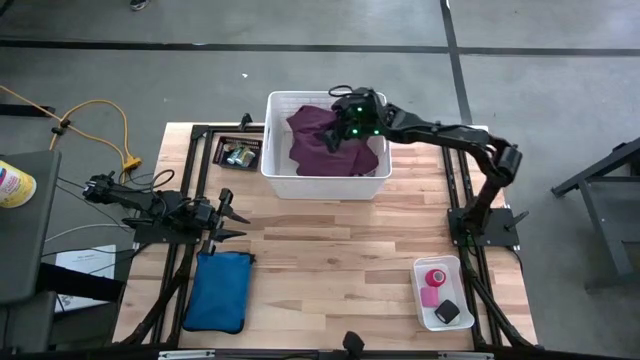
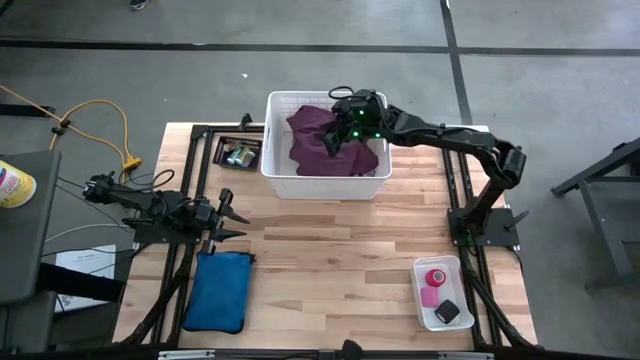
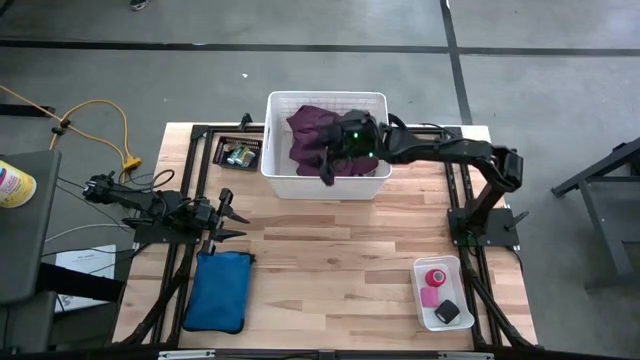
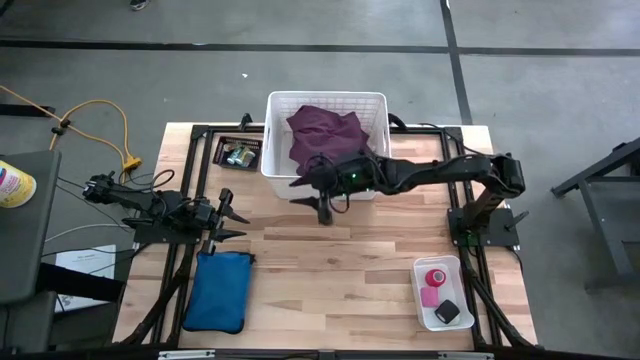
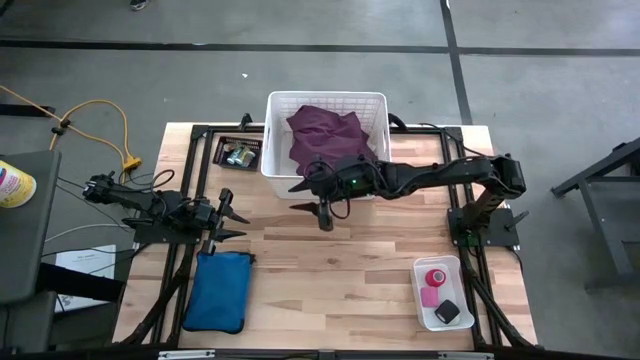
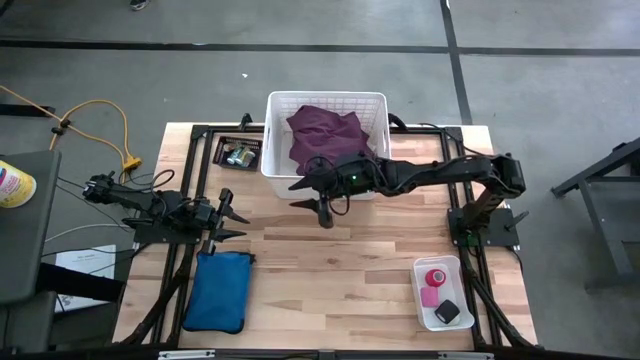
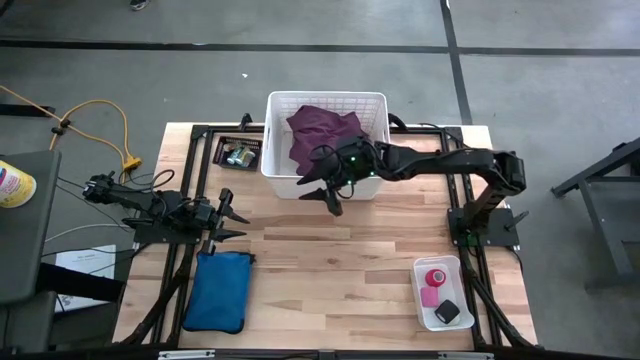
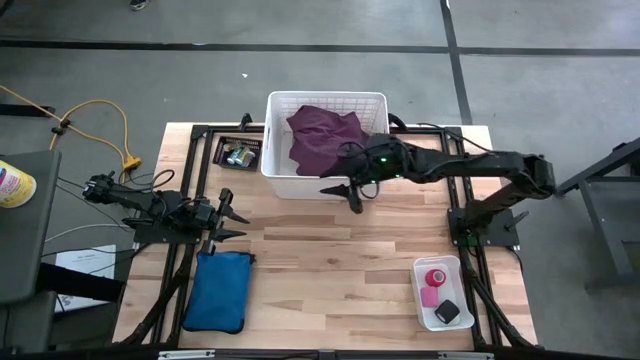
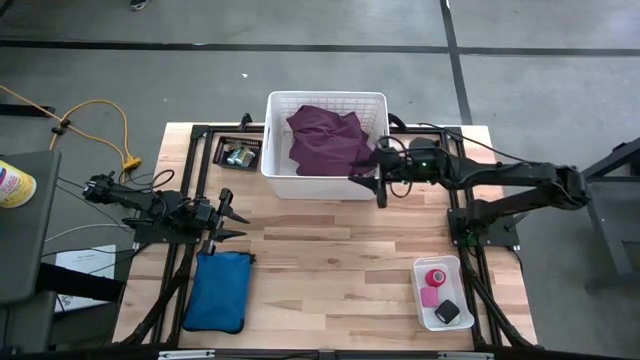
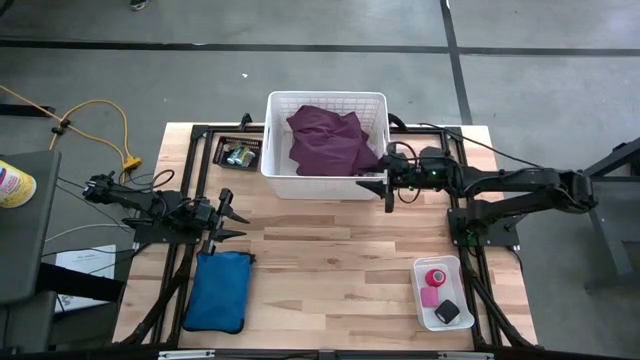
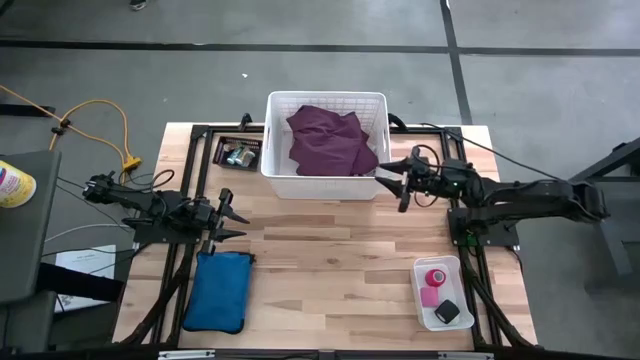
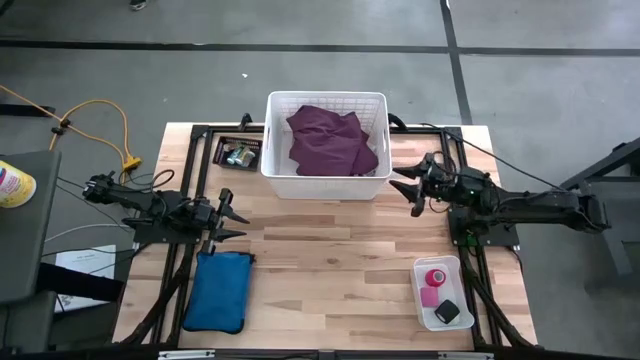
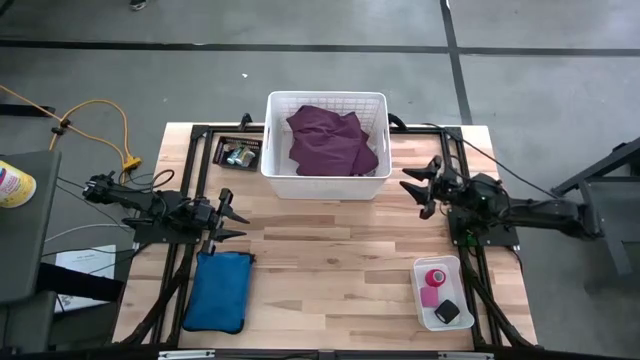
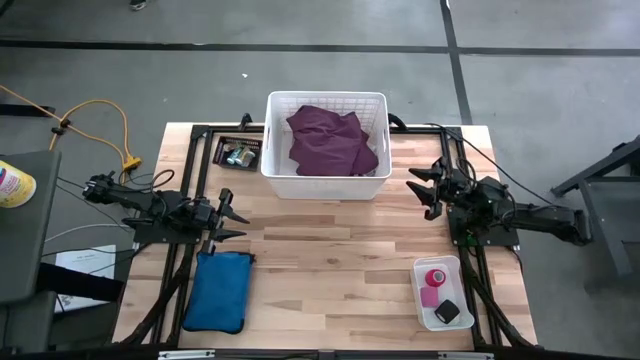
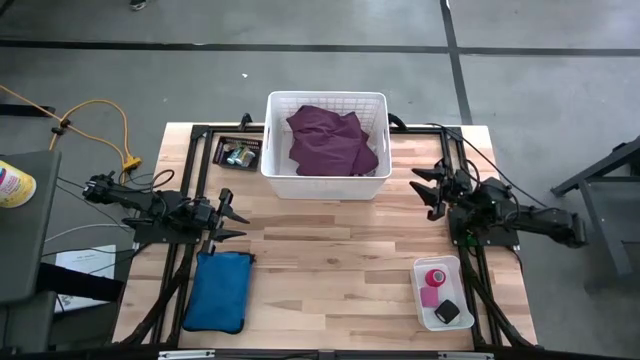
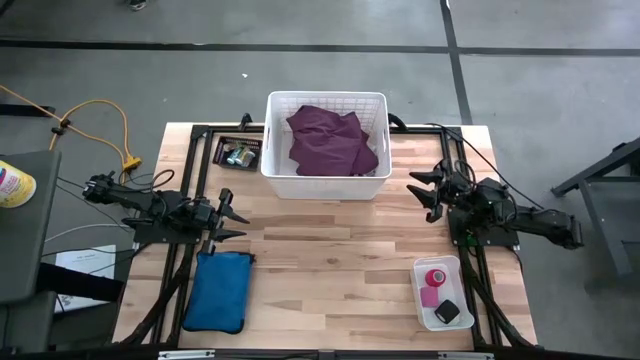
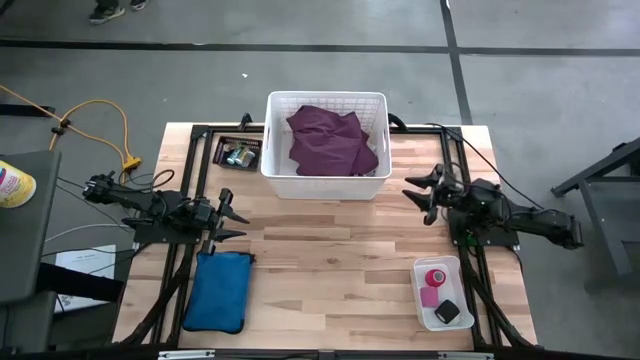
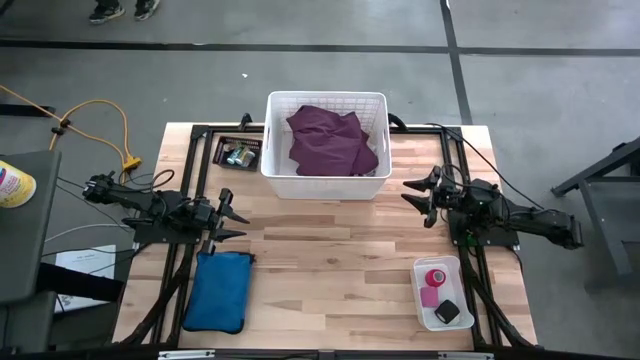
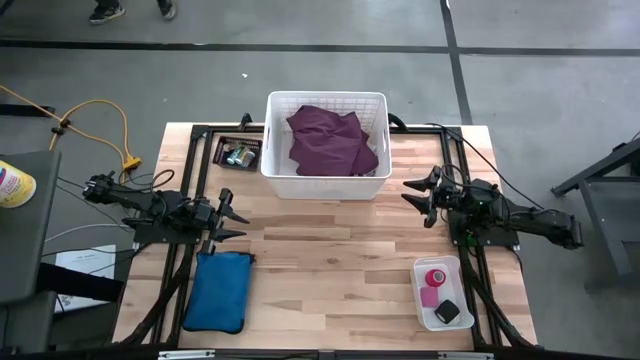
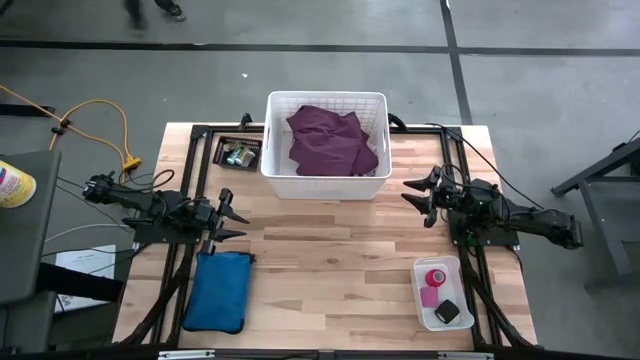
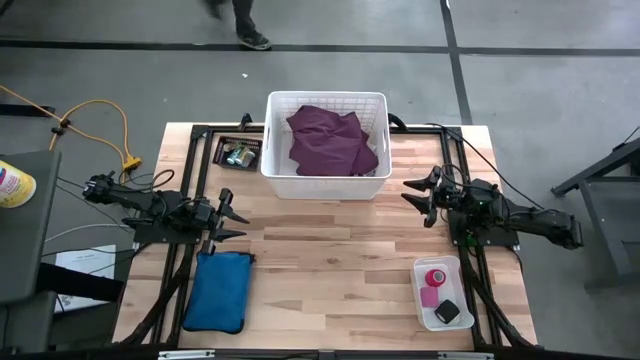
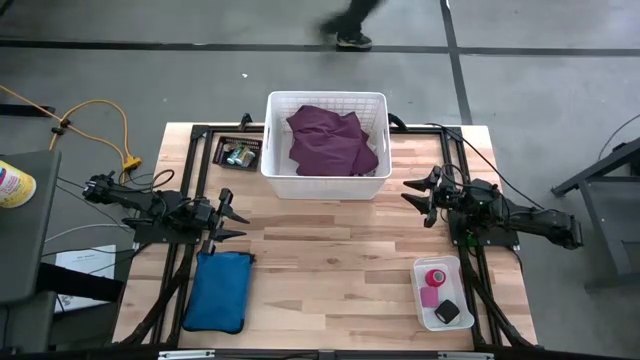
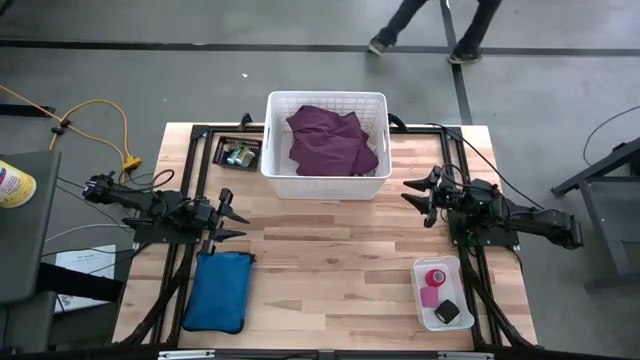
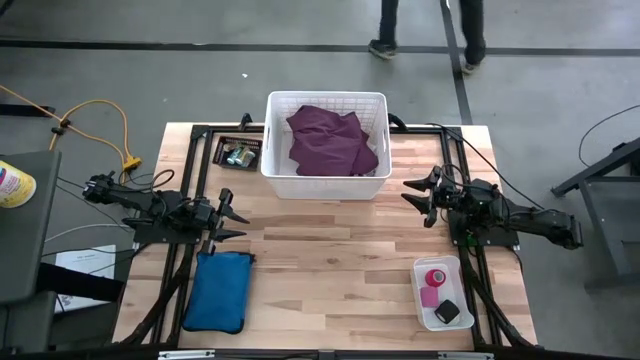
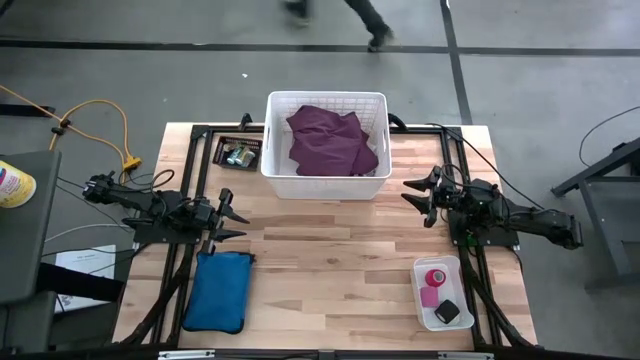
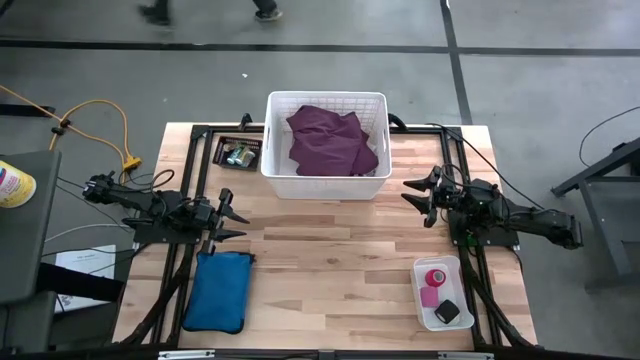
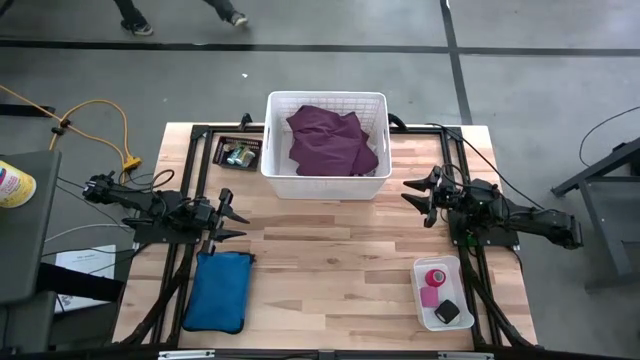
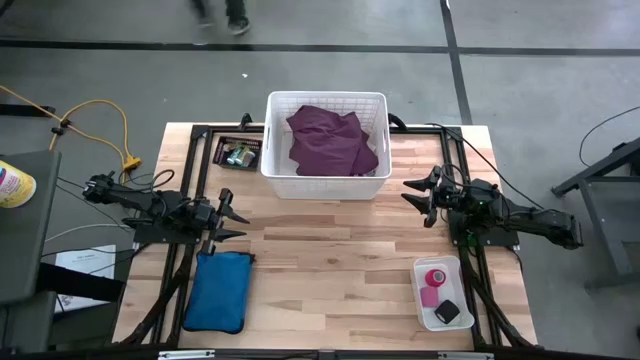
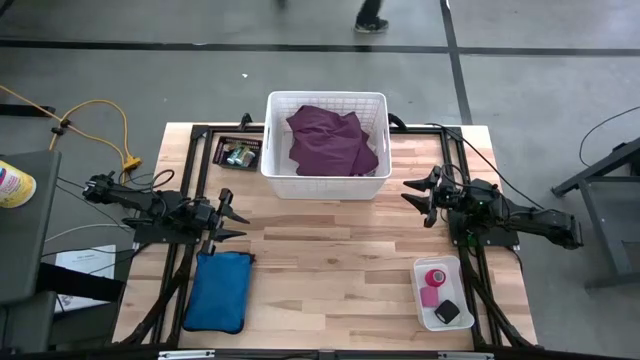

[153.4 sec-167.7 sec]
Task: Pick & place medical supplies in basket/bin
Return to Home Position
